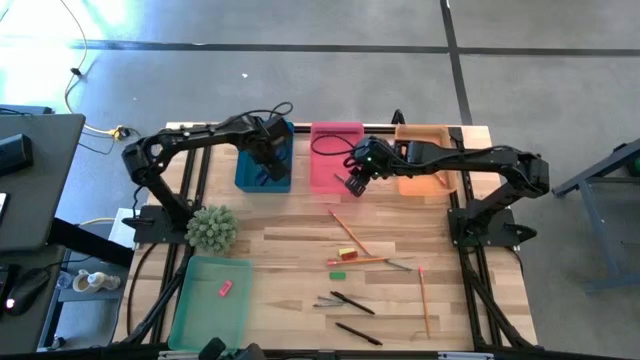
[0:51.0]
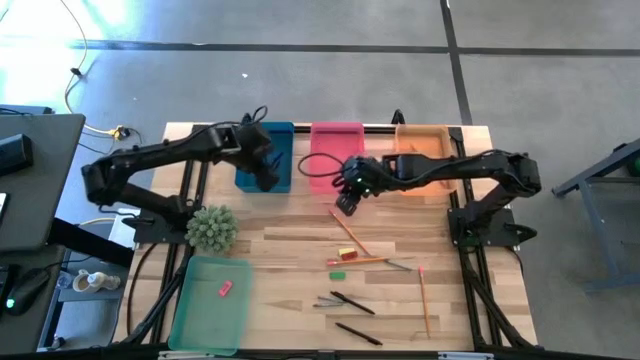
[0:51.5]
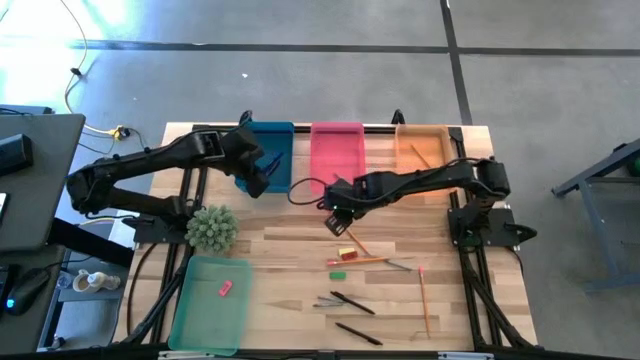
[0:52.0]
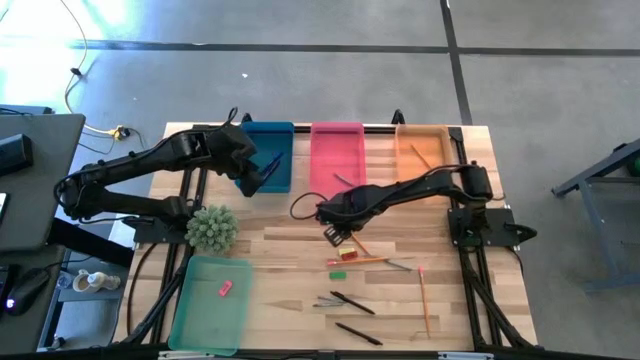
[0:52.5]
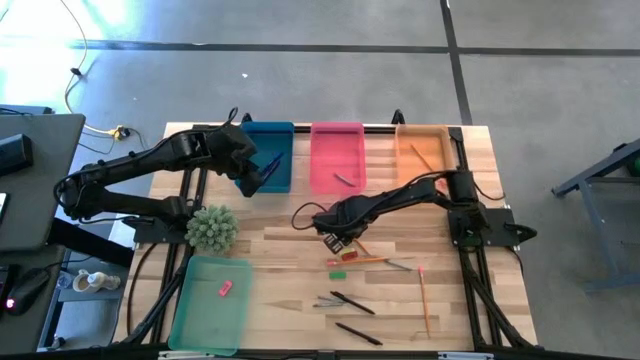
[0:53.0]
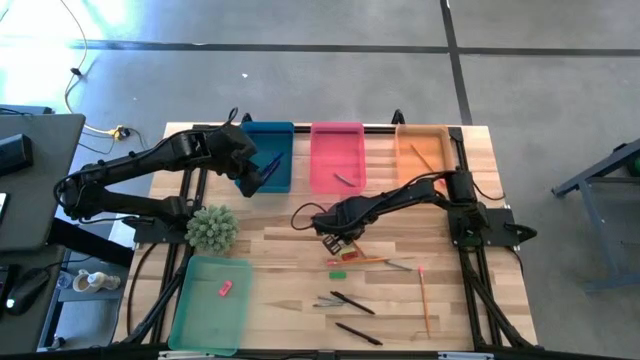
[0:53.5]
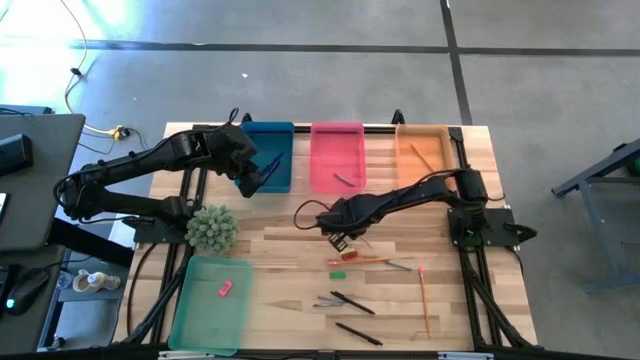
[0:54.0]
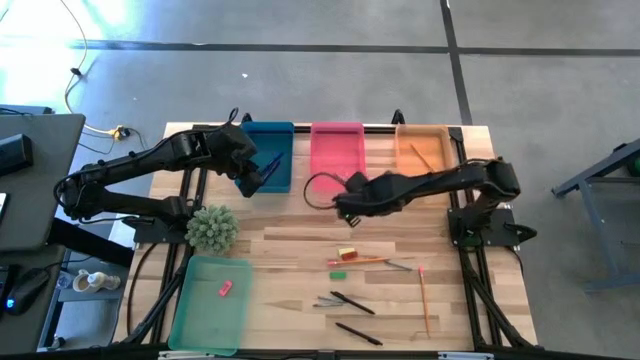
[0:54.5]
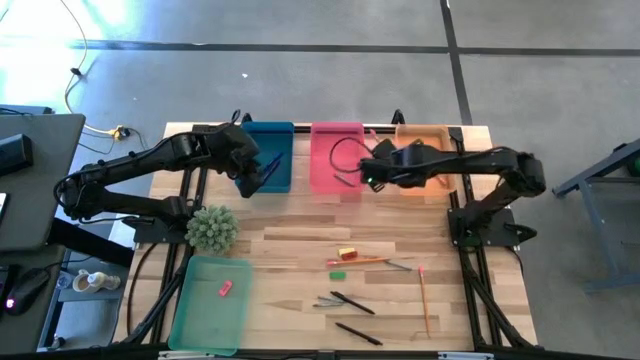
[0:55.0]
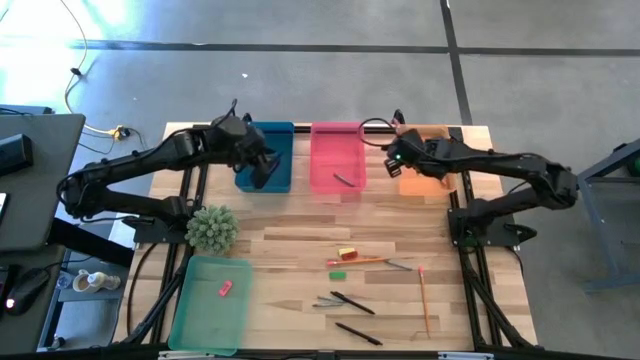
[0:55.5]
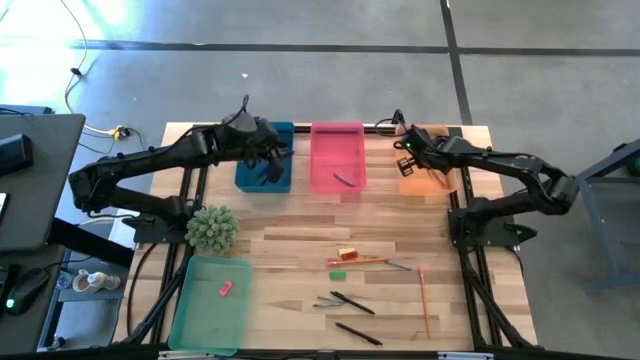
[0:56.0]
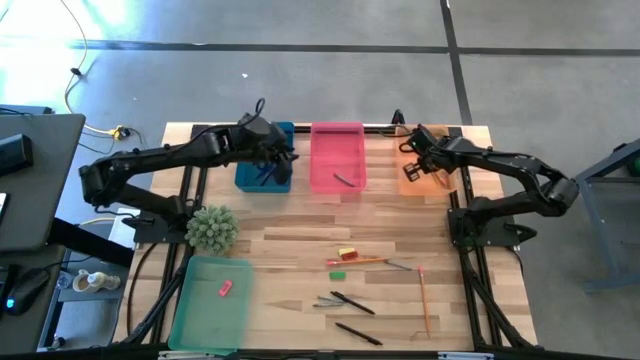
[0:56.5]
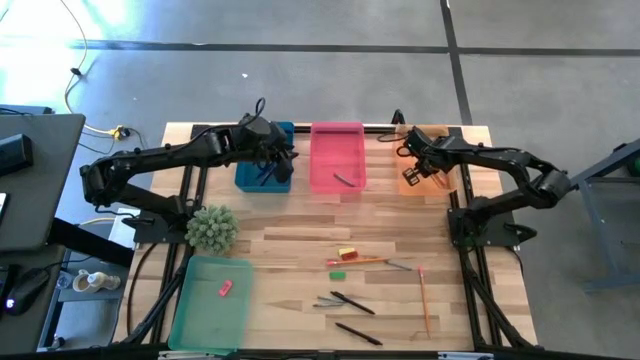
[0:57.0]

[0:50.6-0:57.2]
Task: Sort crayons/erasers/pens/pencils in bins
Put the orange pencil into the orange bin

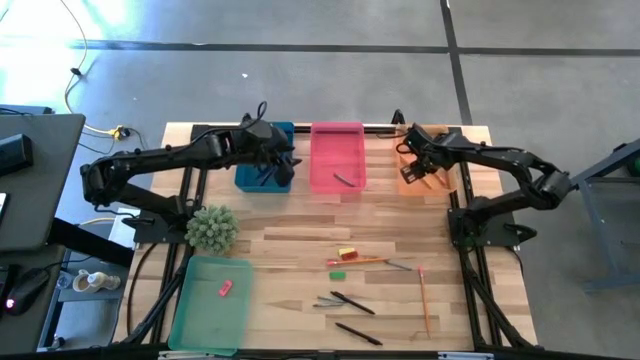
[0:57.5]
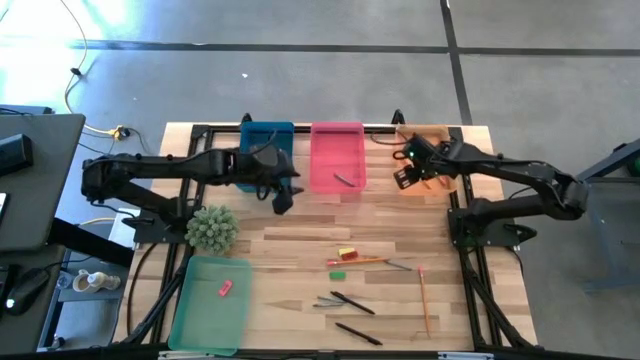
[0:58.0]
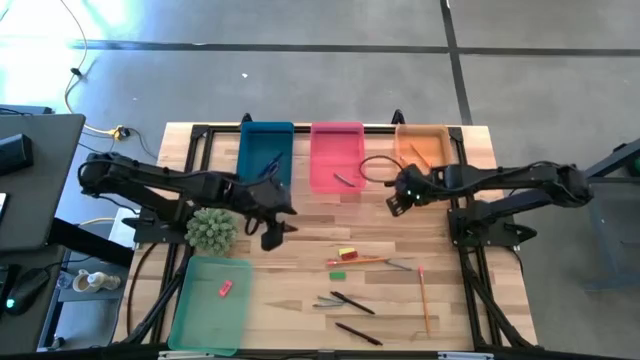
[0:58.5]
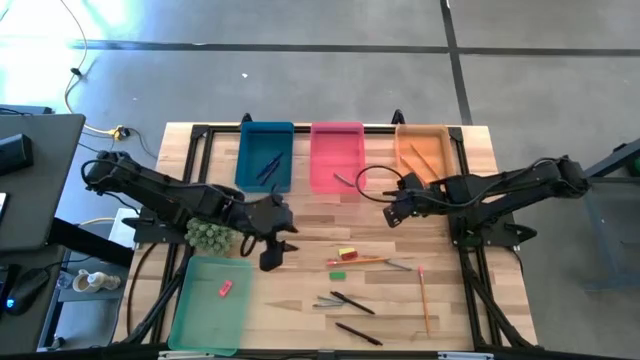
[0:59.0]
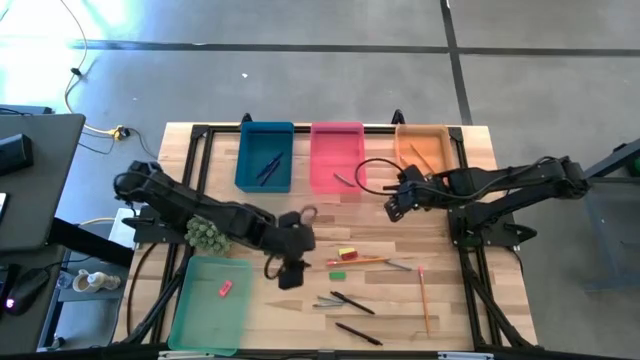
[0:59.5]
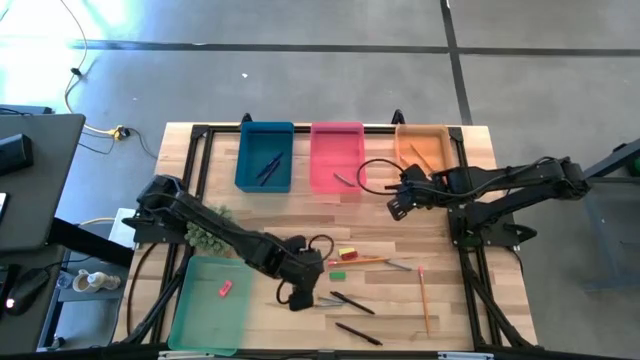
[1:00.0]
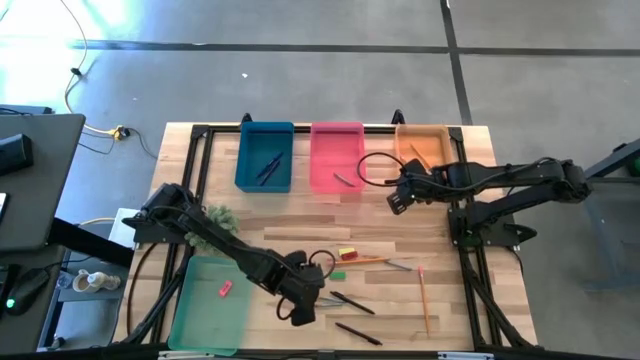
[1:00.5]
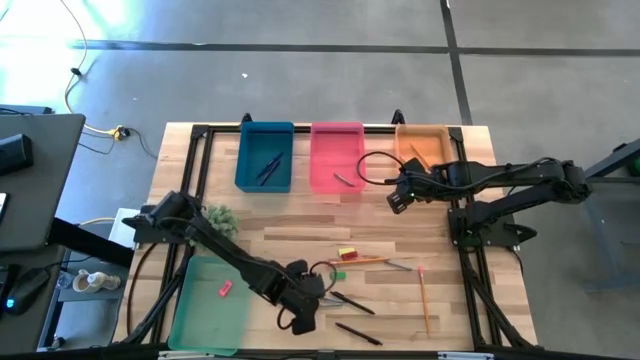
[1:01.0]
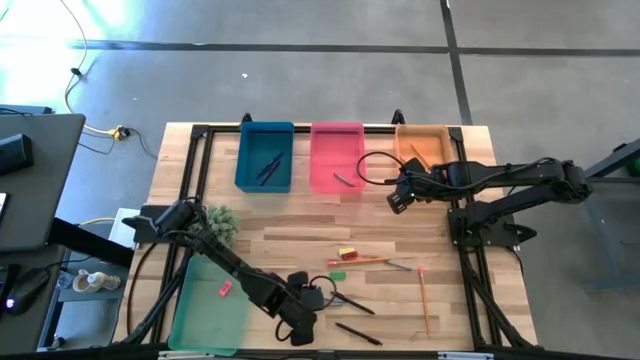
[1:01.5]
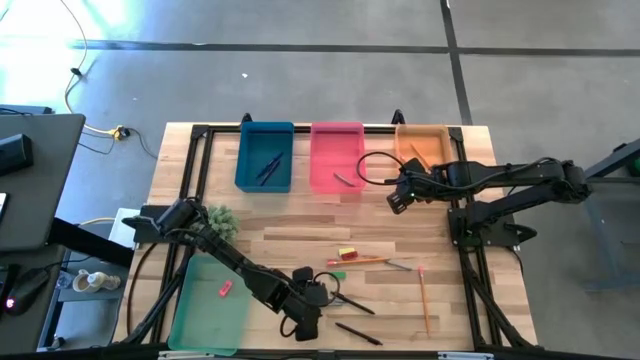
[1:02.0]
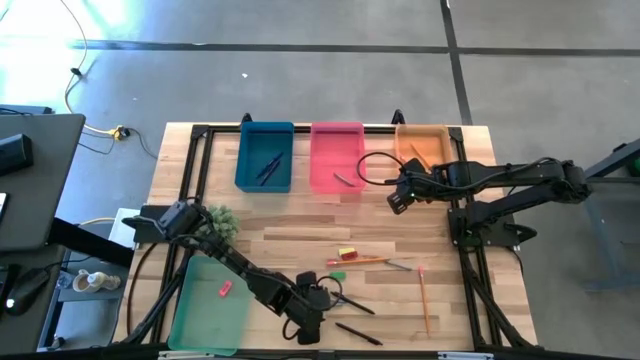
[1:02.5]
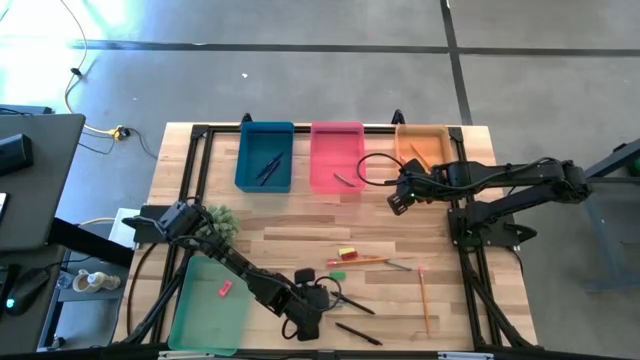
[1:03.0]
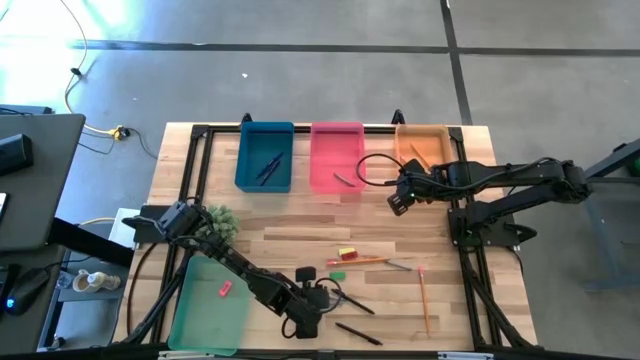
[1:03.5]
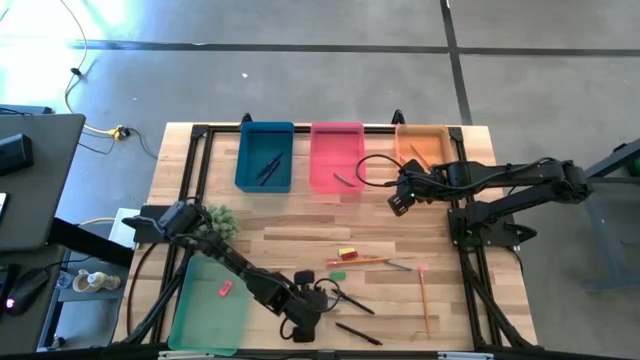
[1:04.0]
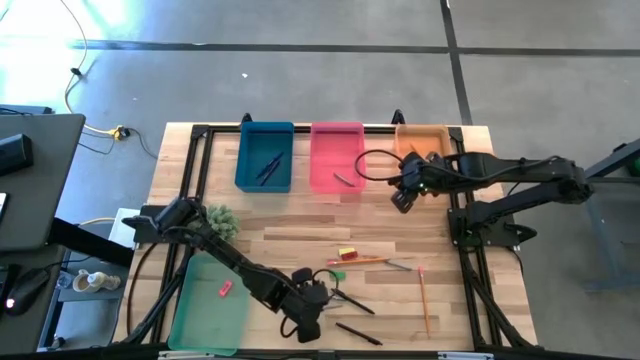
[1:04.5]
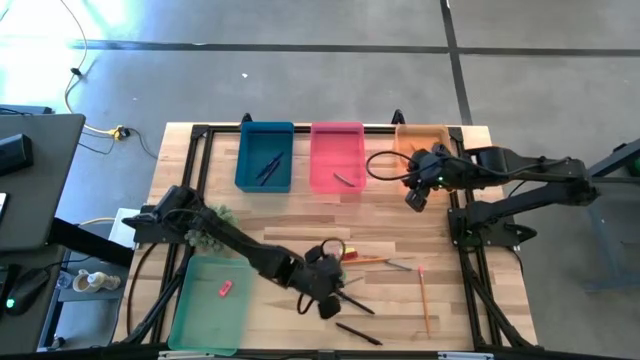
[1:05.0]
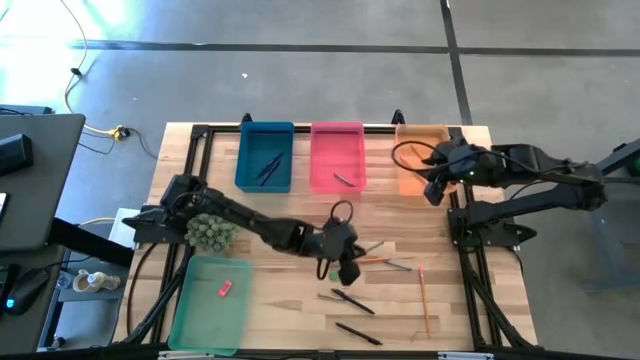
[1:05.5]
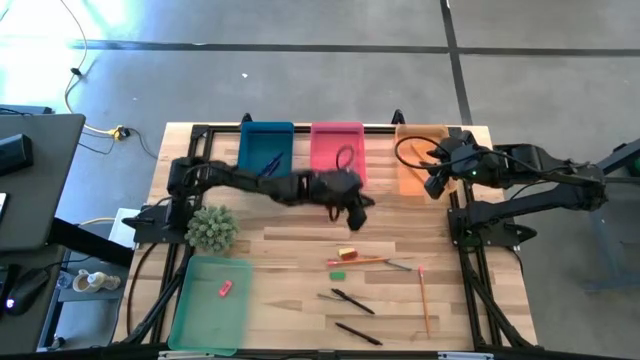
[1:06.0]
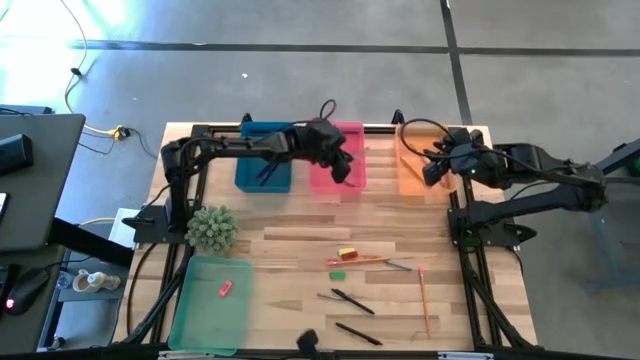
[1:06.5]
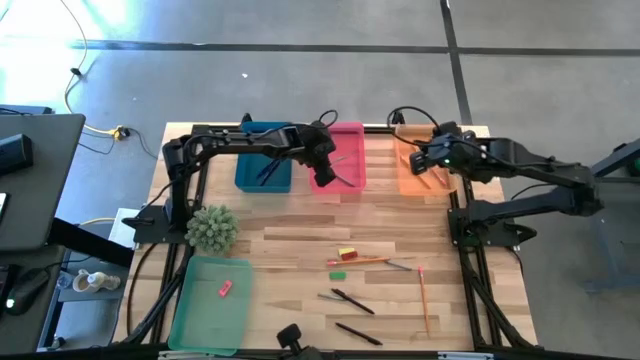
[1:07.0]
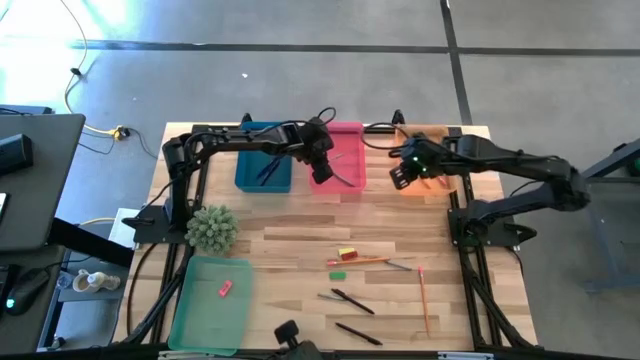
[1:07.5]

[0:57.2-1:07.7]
Put the gray crayon into the pink bin

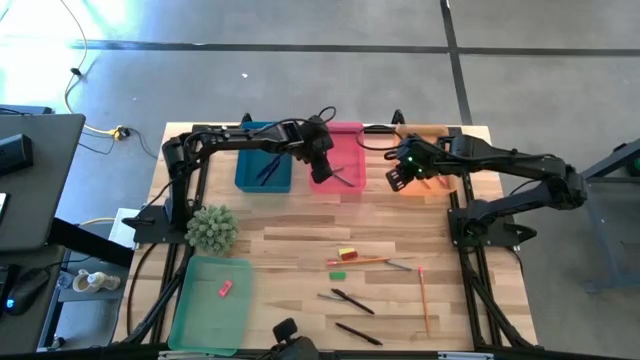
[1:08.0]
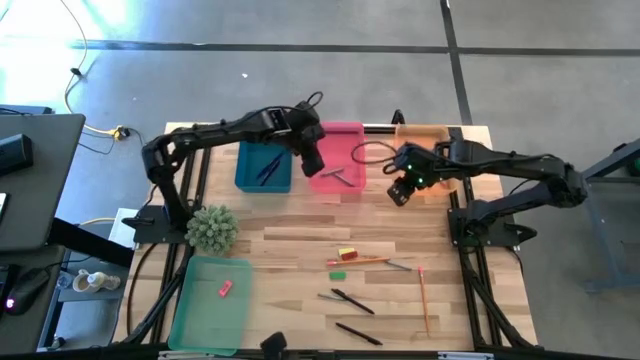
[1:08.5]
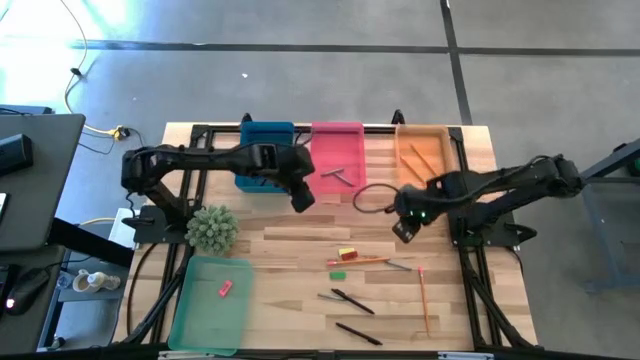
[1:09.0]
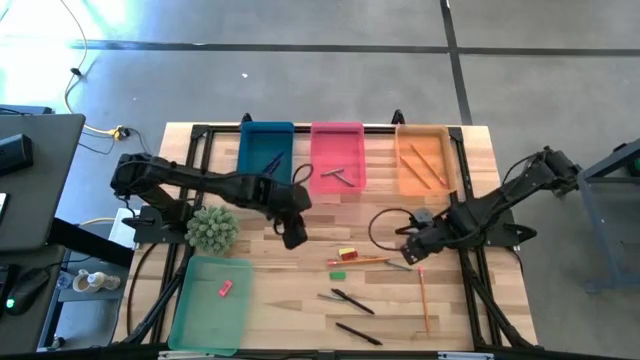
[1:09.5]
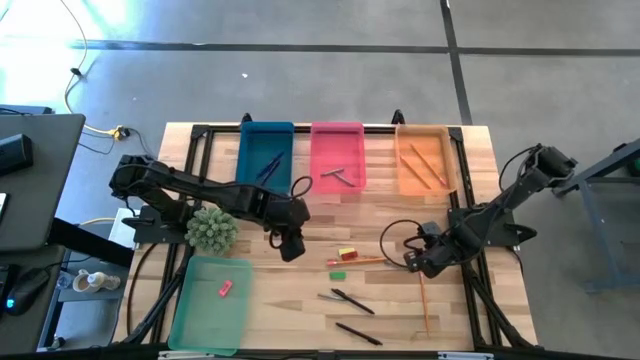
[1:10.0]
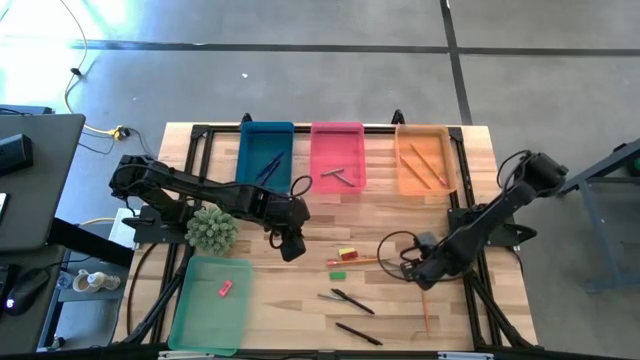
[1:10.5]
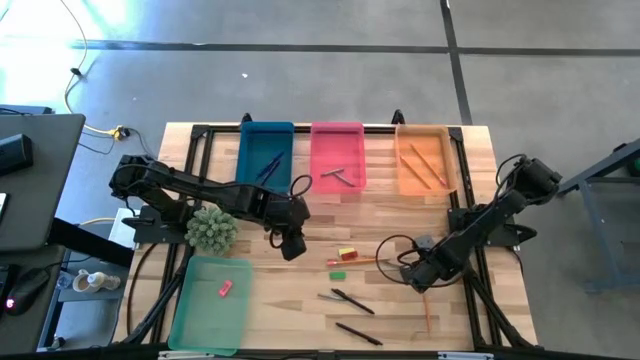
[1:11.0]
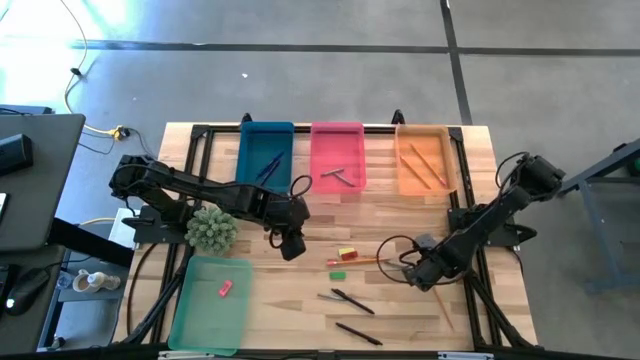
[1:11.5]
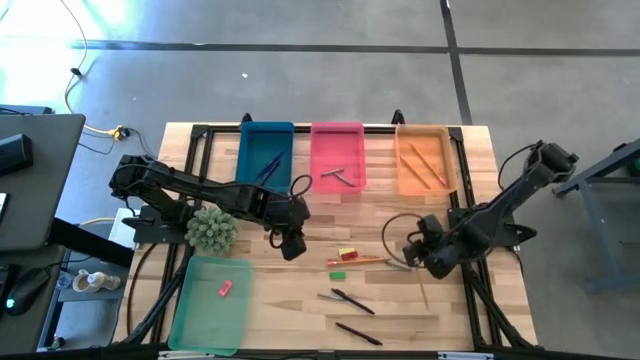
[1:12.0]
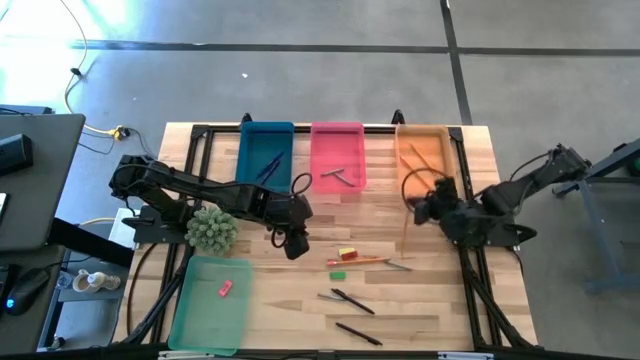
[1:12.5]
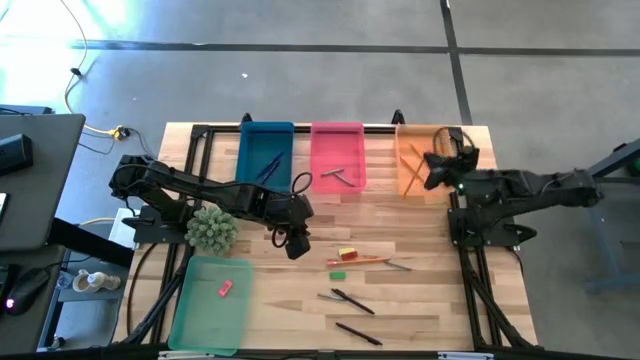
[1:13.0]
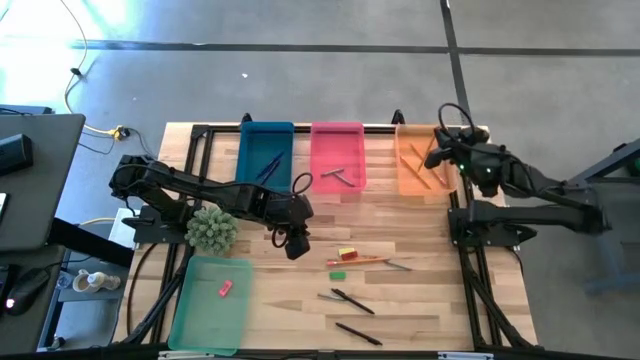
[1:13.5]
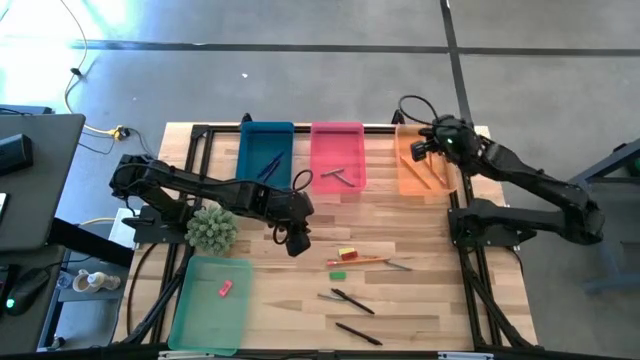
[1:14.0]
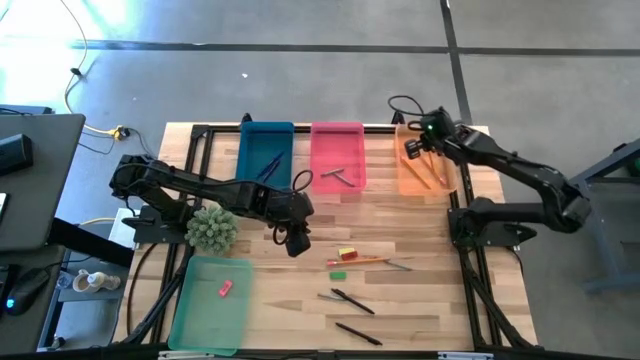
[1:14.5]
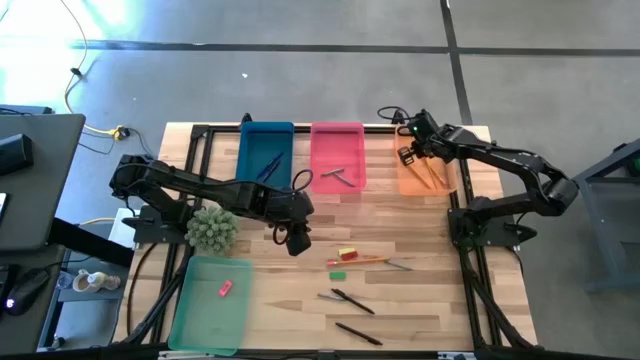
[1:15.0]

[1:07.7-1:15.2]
Put the orange pencil into the orange bin
